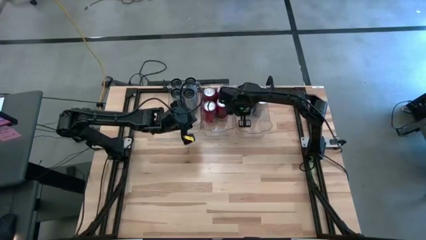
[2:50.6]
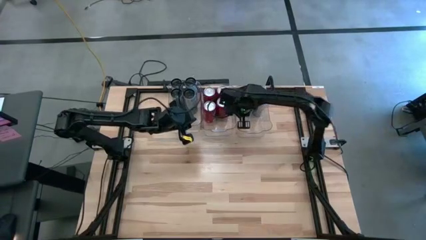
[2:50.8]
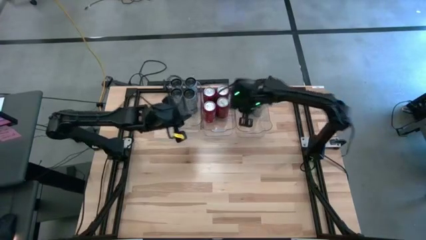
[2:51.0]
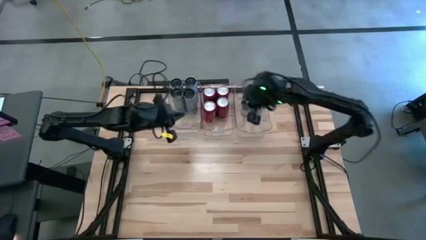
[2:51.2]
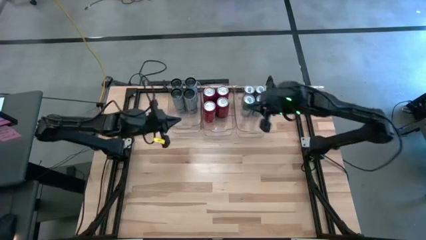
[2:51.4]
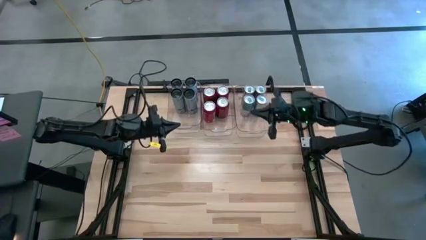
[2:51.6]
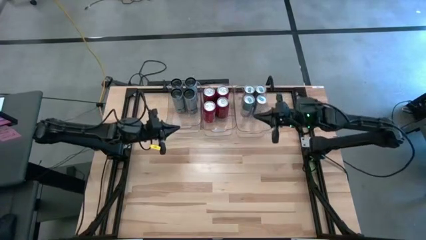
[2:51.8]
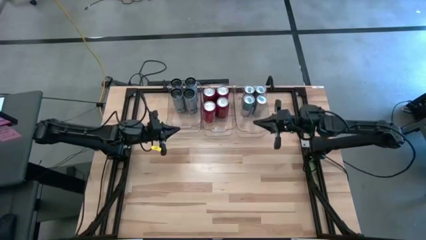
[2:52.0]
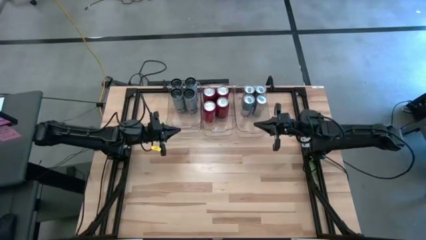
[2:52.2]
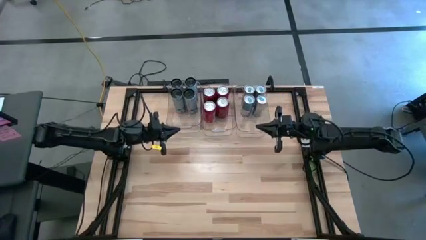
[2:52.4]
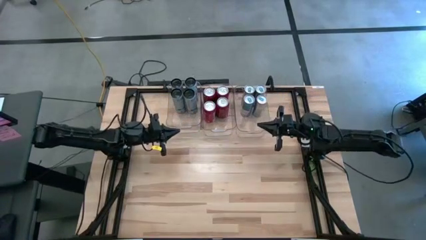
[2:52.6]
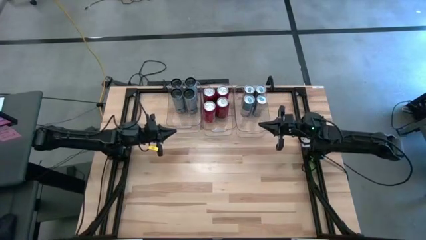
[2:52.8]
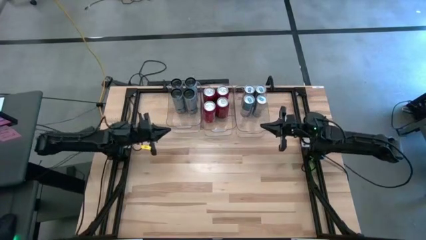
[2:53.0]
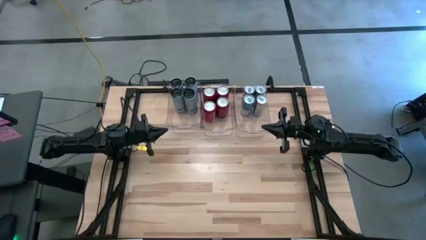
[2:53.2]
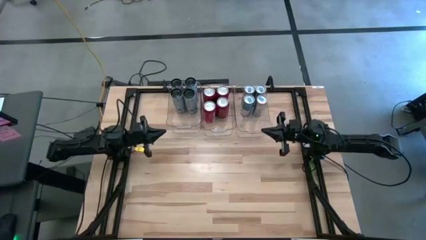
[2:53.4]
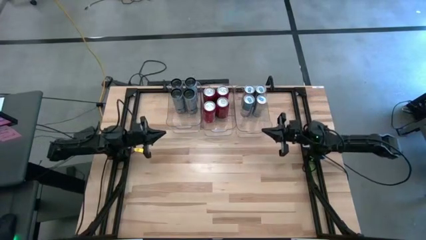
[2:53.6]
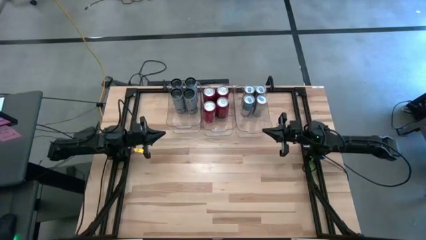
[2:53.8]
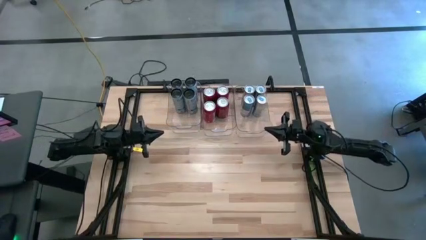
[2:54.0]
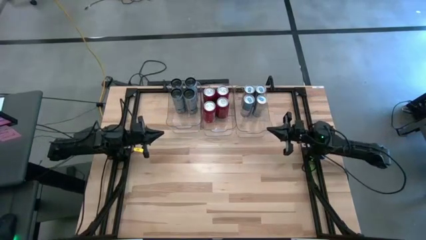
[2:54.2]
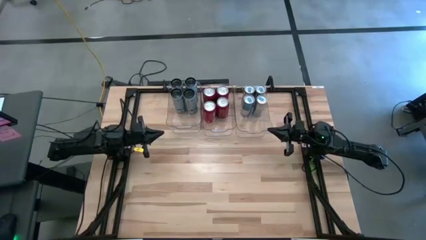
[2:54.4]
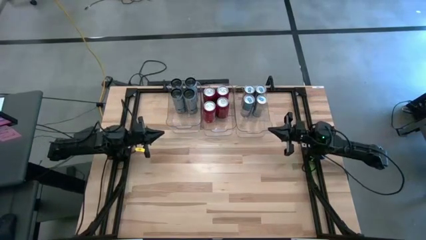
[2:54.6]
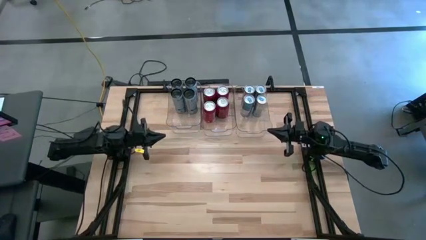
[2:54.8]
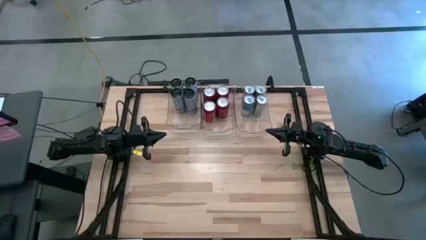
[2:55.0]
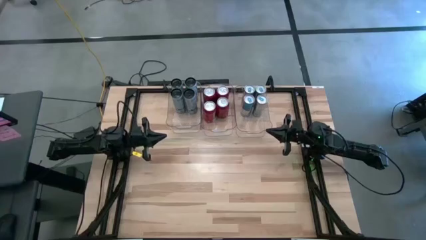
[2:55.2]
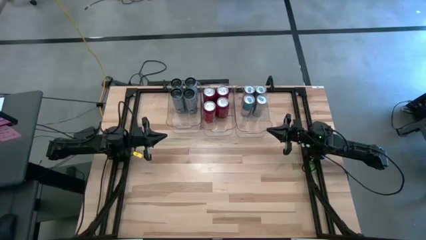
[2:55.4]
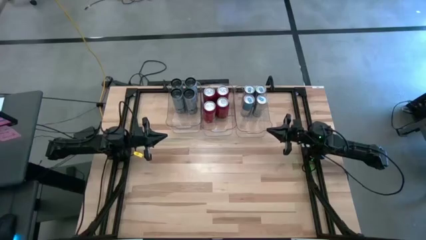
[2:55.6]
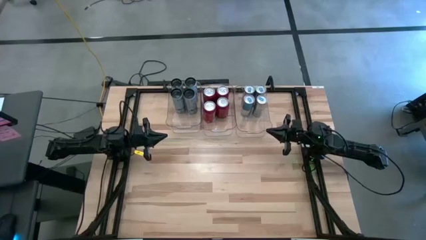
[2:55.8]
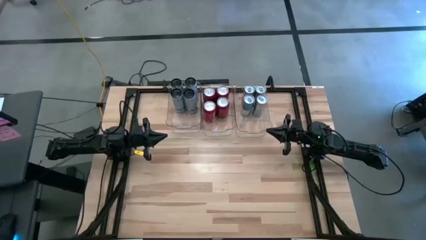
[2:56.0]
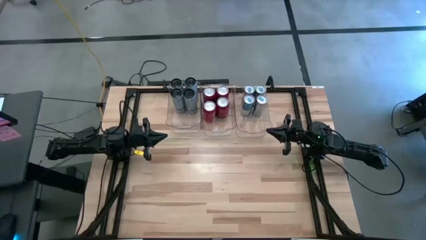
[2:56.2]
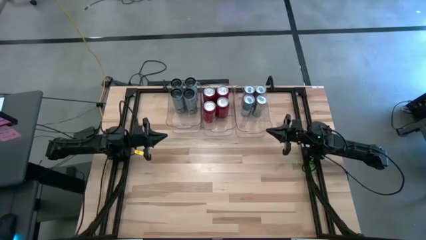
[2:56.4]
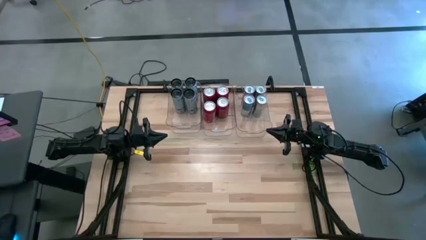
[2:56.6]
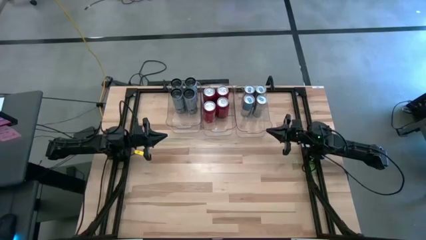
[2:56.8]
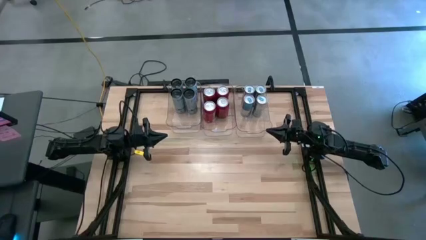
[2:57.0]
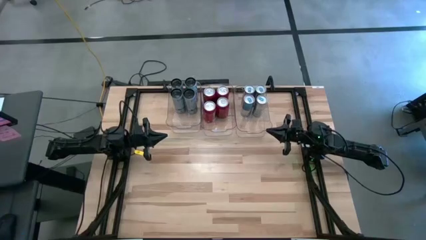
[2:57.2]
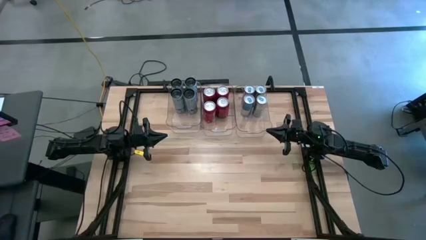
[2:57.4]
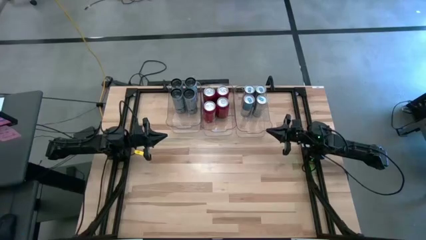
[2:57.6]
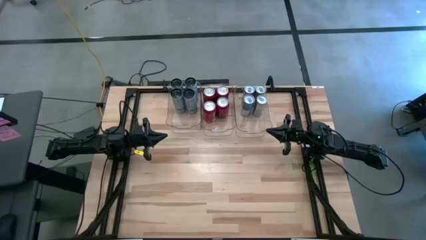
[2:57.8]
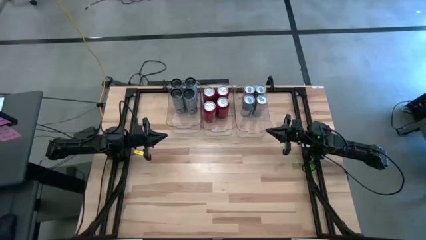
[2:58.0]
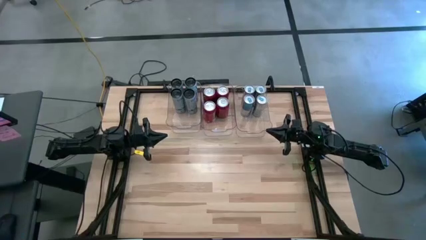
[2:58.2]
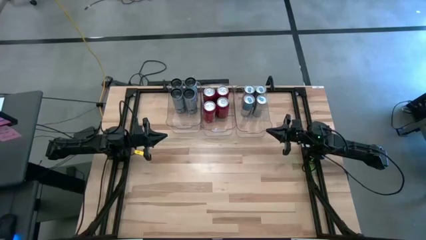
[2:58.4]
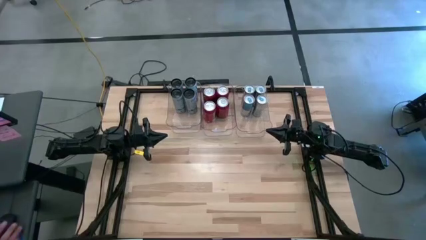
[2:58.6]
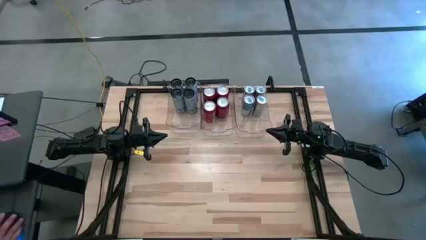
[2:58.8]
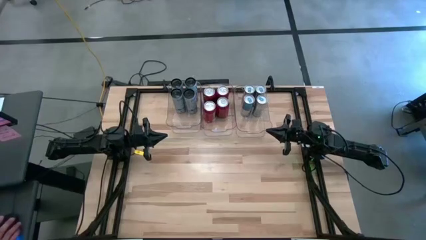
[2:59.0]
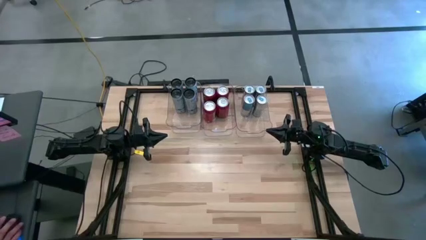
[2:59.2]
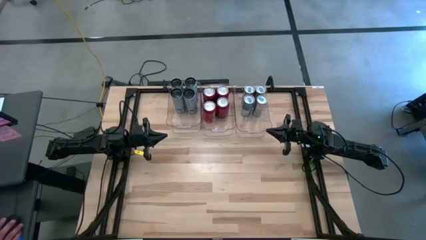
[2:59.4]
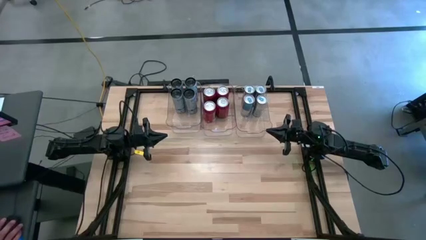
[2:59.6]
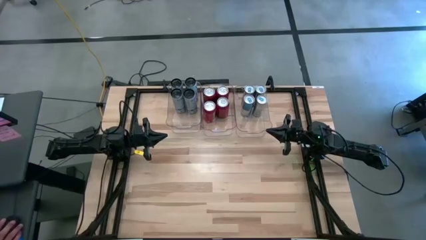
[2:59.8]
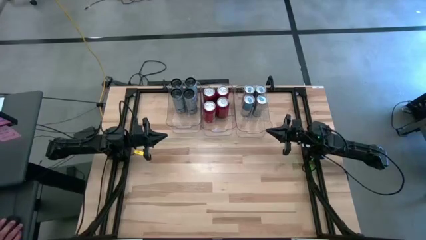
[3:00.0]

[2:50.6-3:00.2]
Task: Sort soda cans
Return to Home Position

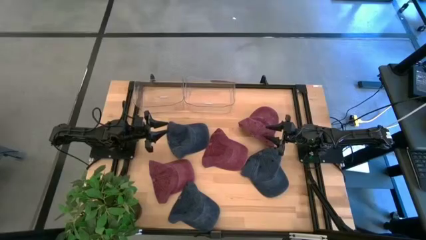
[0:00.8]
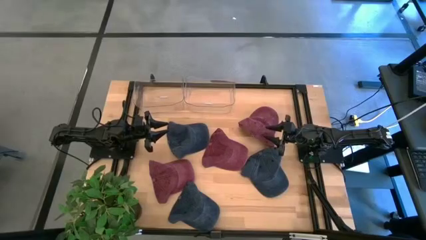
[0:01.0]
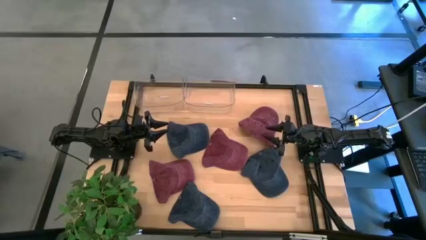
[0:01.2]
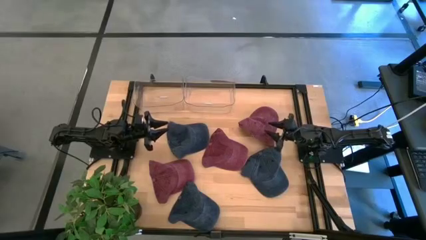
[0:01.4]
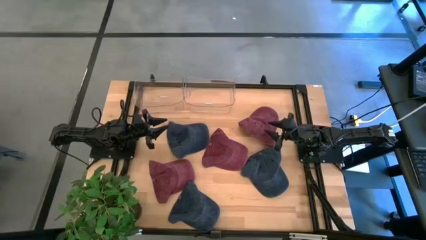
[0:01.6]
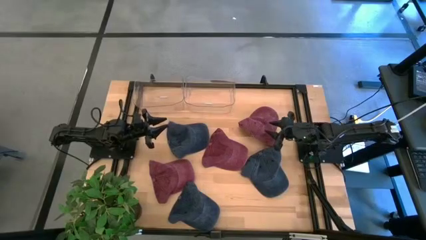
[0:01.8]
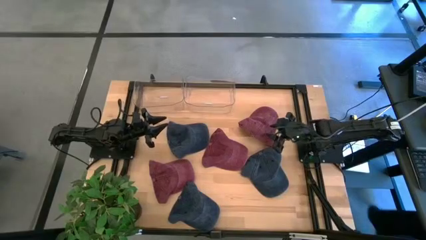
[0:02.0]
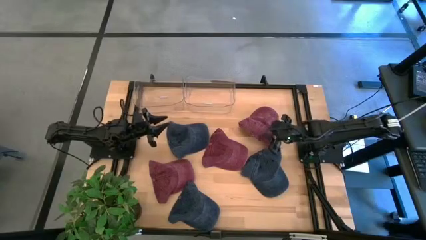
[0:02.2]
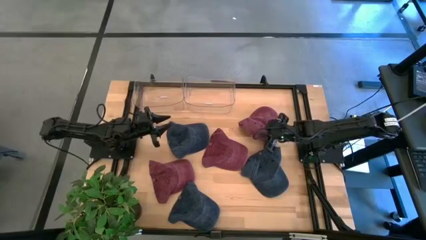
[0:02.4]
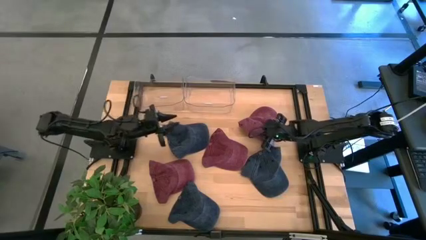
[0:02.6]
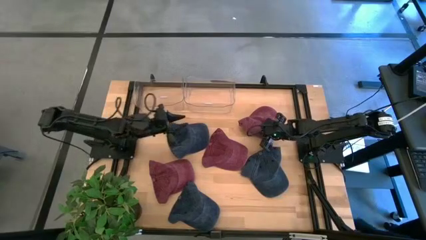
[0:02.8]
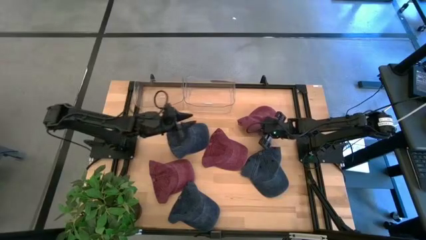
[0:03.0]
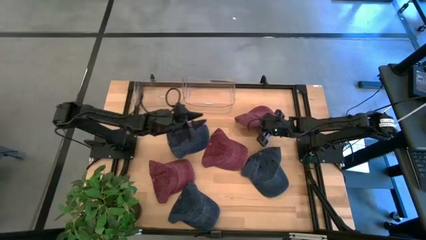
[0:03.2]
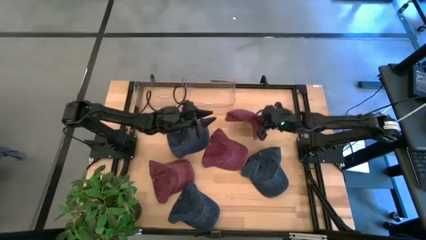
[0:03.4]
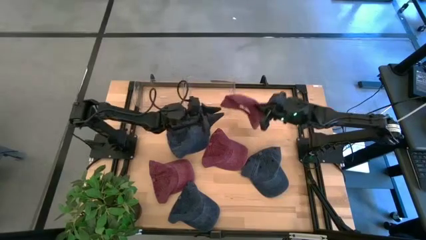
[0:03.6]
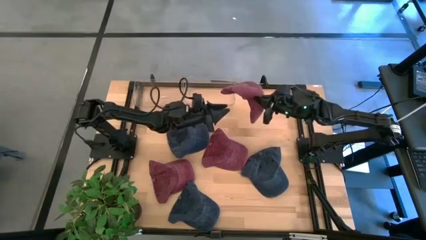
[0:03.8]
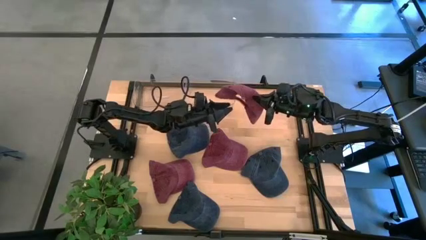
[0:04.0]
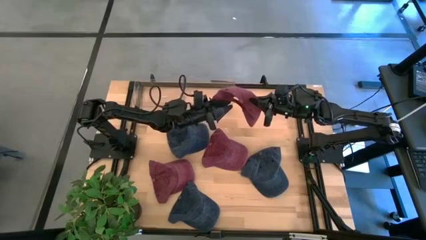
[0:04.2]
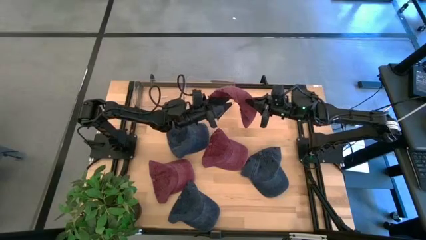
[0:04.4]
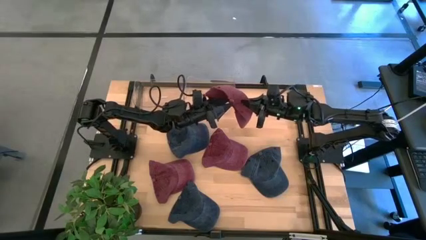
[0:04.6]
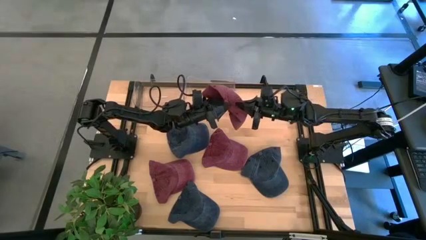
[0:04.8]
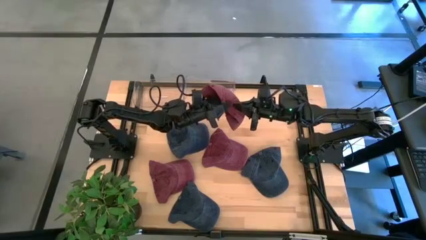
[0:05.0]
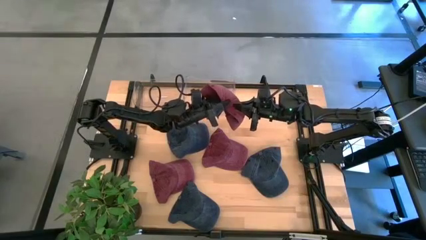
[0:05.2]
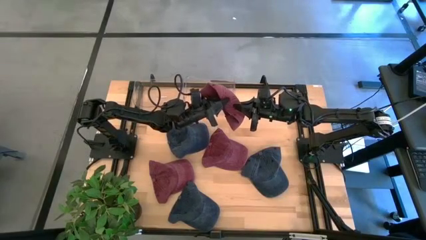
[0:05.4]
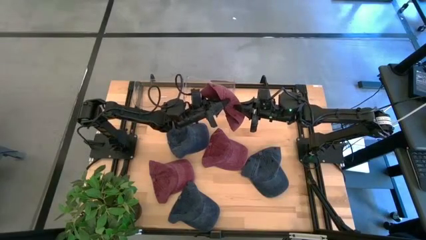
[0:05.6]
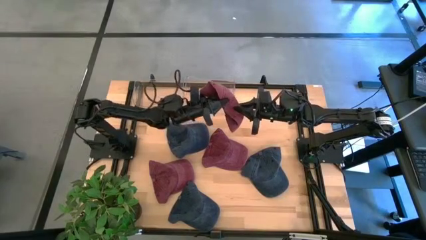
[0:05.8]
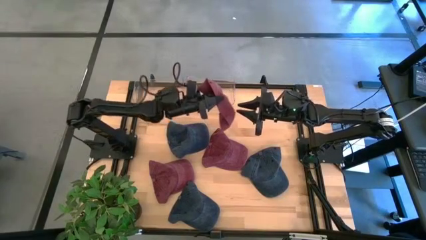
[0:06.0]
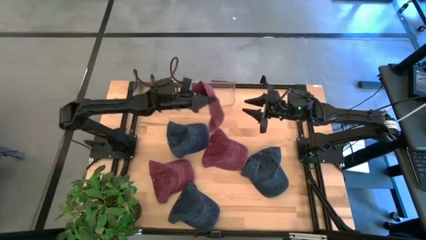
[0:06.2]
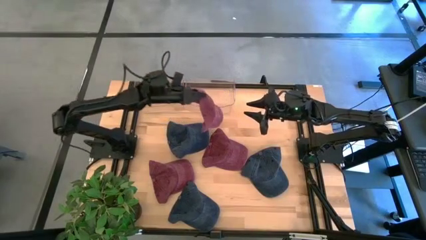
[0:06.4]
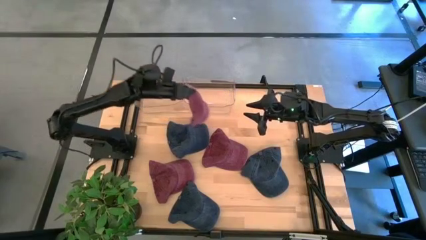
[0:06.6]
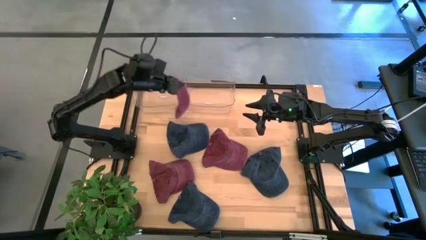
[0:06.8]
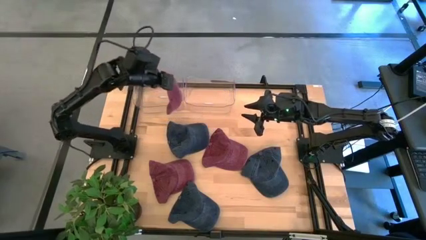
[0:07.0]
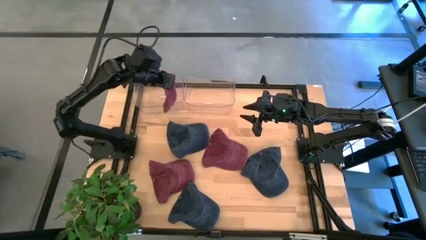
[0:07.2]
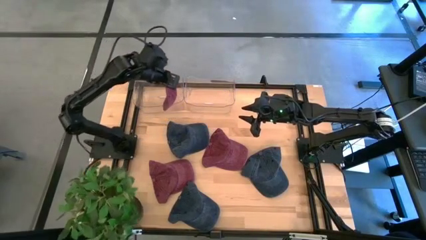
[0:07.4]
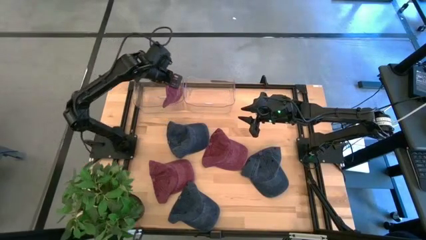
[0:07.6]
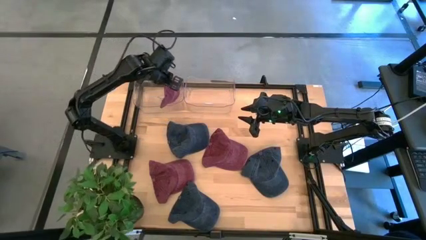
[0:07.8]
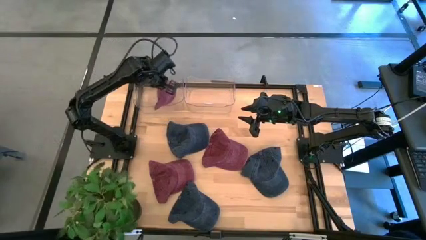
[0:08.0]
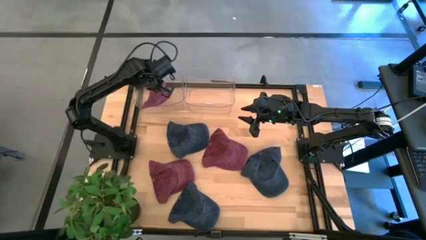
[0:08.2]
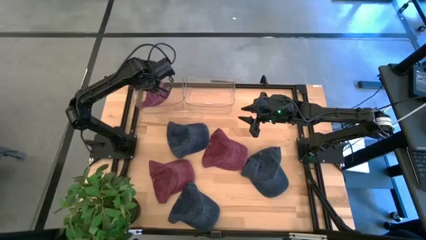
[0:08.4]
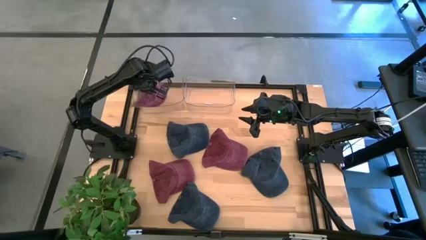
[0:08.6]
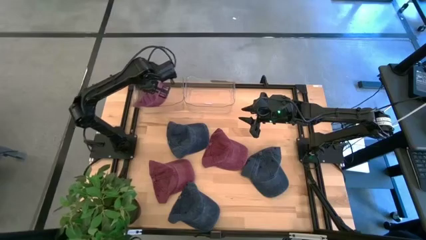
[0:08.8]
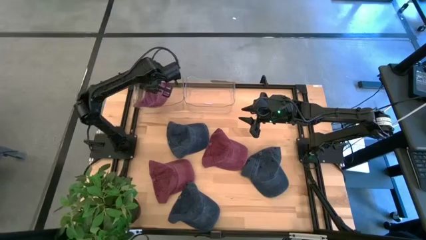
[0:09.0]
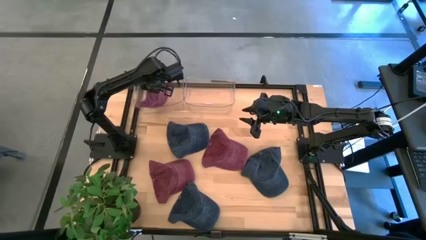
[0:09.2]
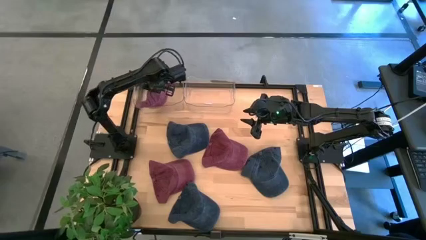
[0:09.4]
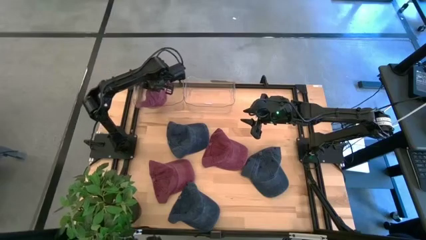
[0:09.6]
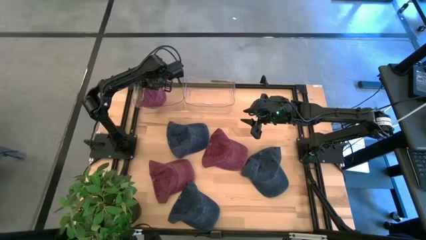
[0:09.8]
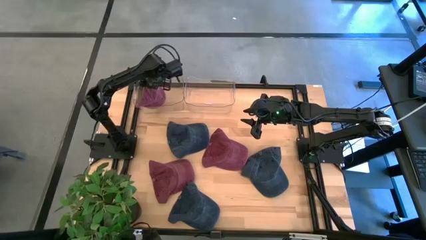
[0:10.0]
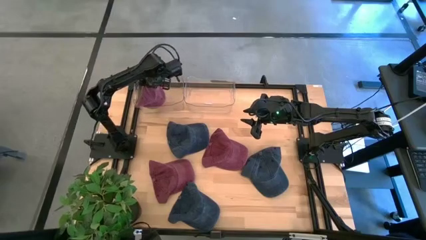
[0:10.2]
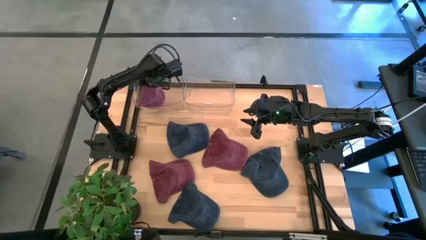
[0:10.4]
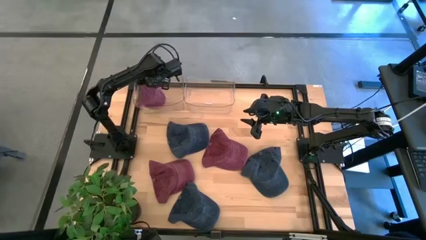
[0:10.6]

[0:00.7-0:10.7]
Task: Pick & Place hat
Put the top dark red cap into the left transparent bin
